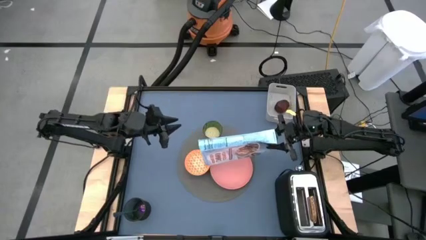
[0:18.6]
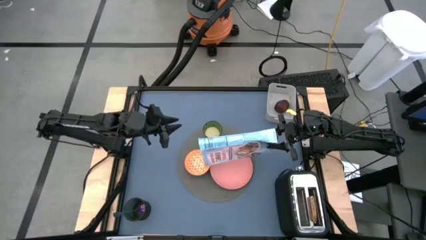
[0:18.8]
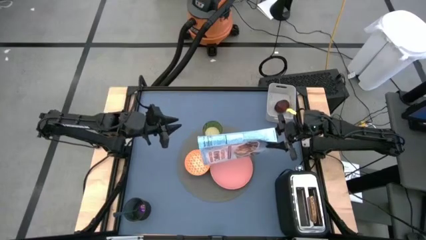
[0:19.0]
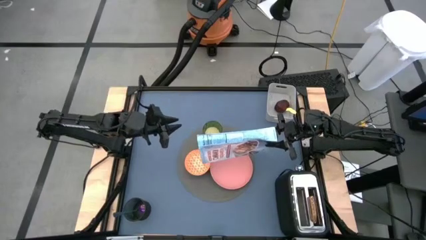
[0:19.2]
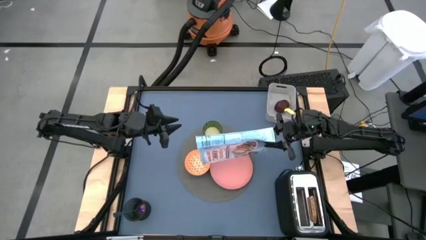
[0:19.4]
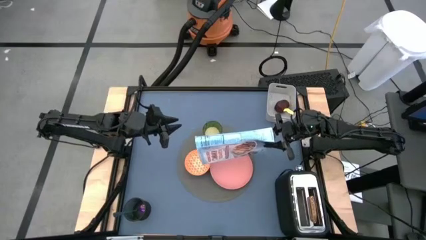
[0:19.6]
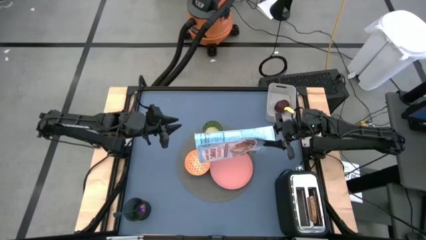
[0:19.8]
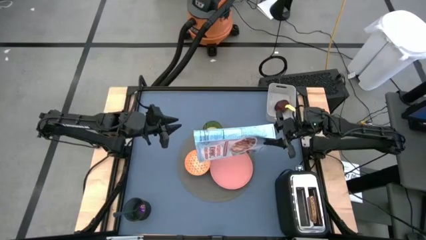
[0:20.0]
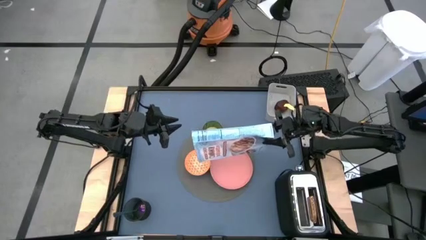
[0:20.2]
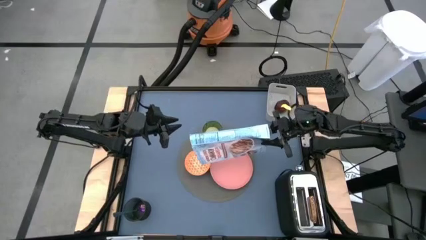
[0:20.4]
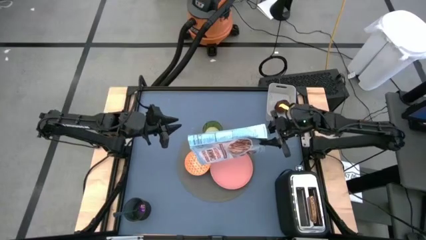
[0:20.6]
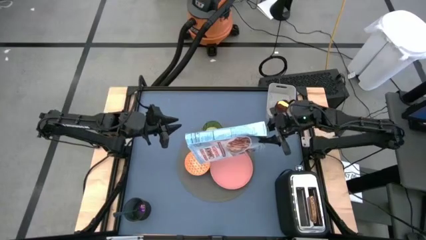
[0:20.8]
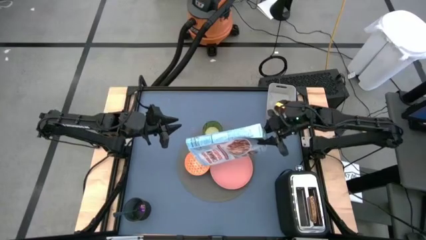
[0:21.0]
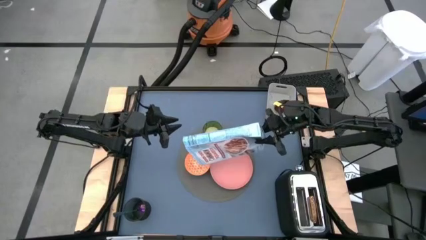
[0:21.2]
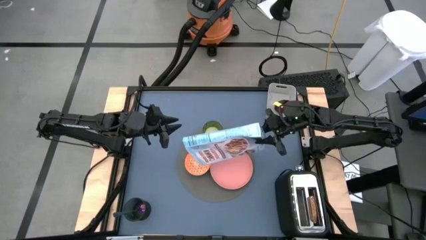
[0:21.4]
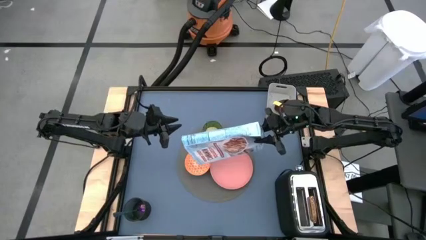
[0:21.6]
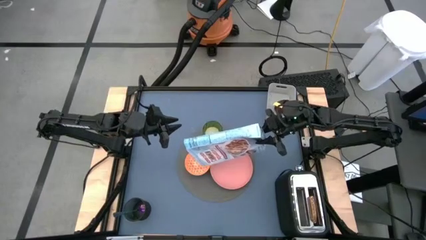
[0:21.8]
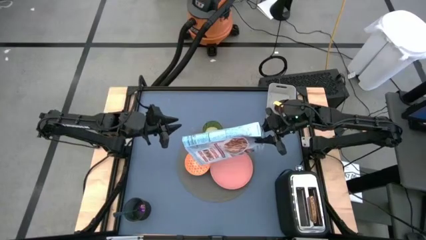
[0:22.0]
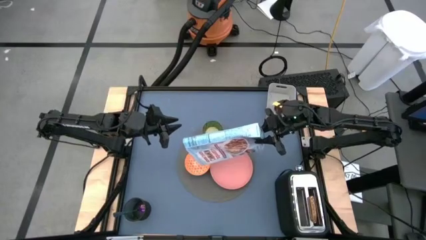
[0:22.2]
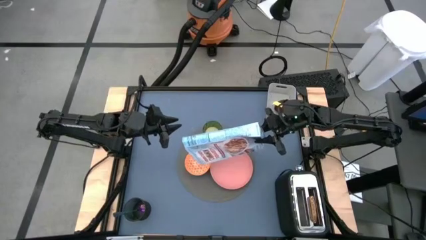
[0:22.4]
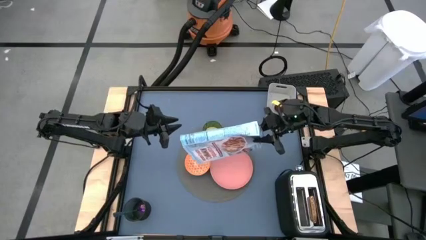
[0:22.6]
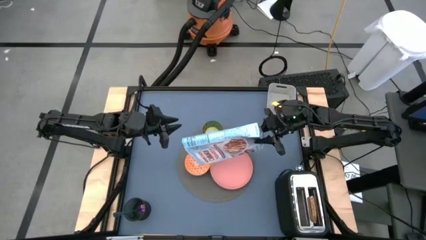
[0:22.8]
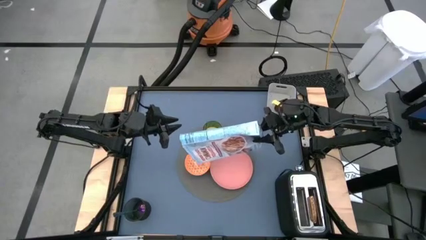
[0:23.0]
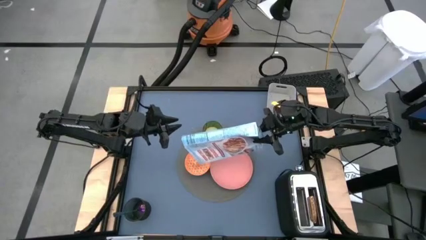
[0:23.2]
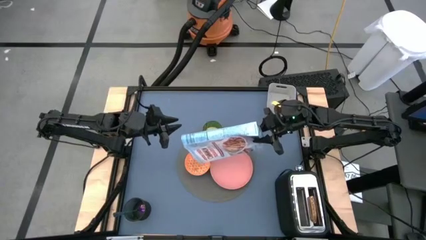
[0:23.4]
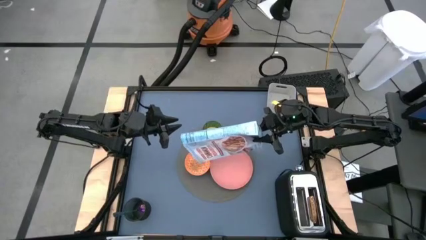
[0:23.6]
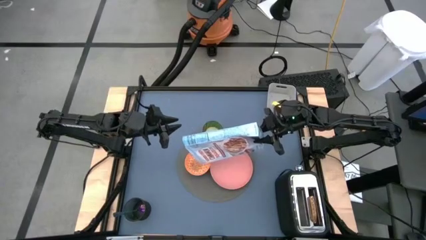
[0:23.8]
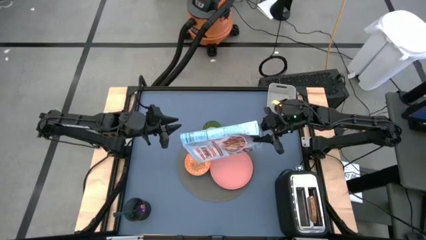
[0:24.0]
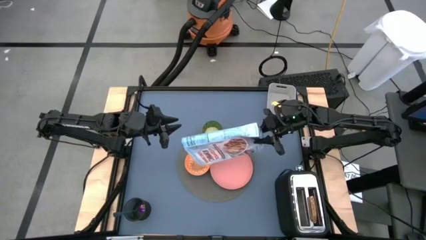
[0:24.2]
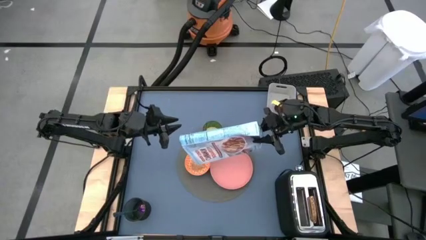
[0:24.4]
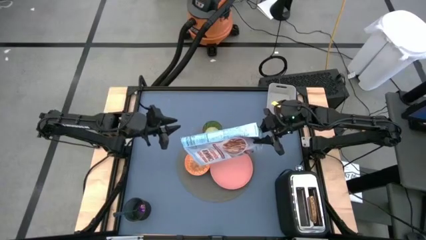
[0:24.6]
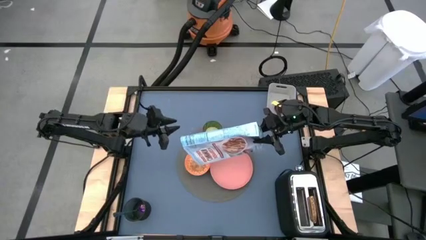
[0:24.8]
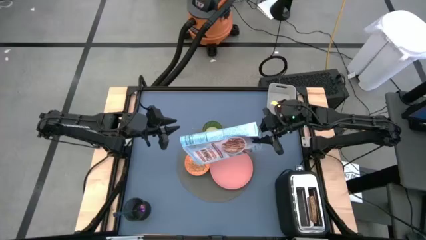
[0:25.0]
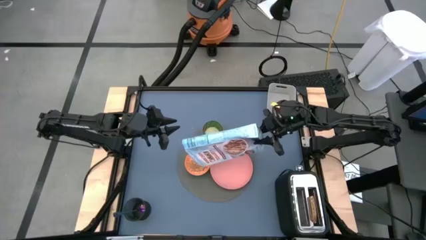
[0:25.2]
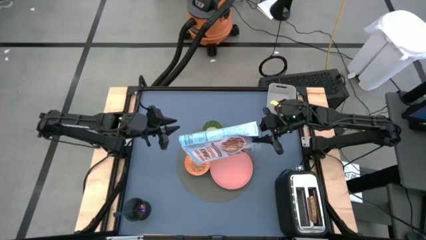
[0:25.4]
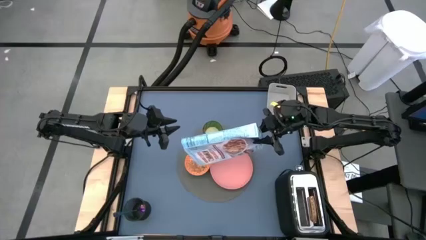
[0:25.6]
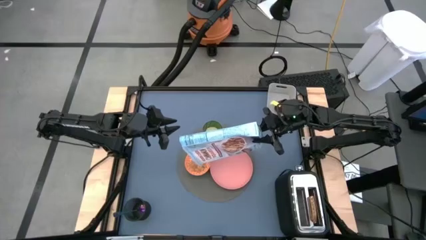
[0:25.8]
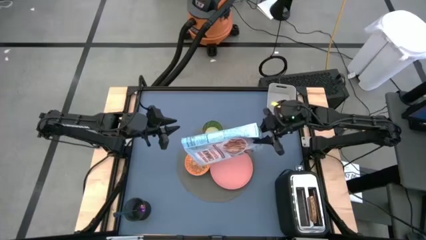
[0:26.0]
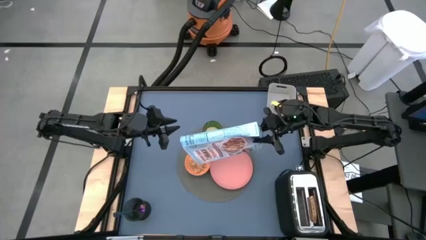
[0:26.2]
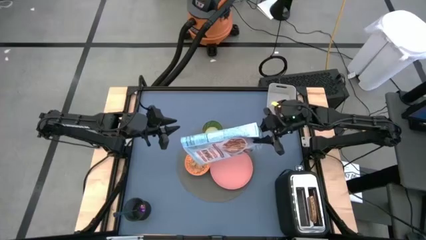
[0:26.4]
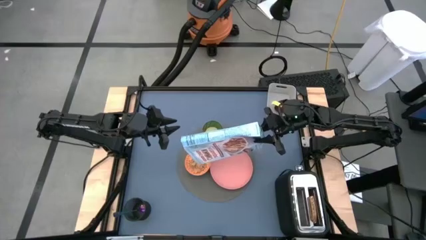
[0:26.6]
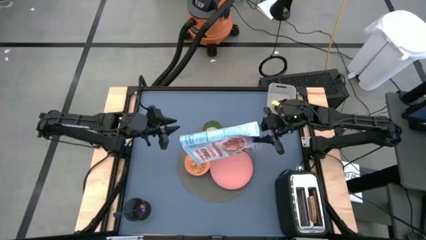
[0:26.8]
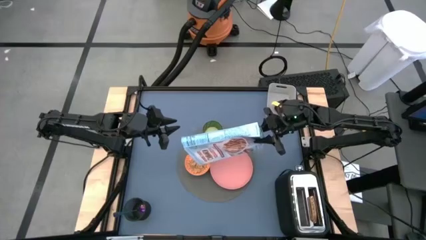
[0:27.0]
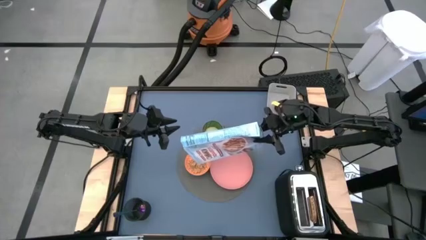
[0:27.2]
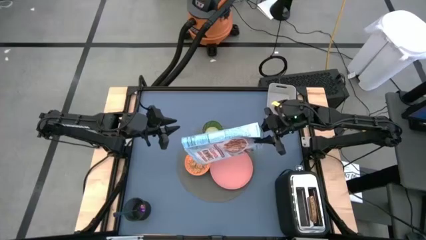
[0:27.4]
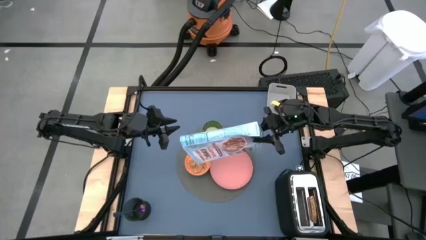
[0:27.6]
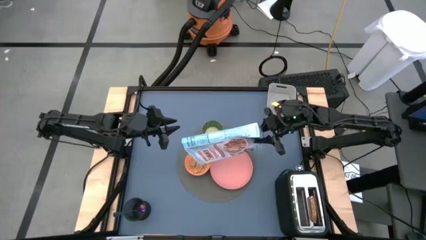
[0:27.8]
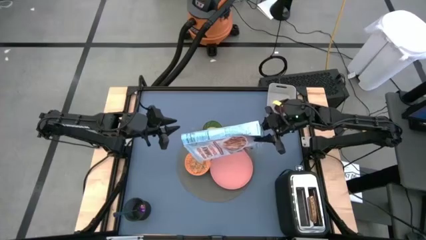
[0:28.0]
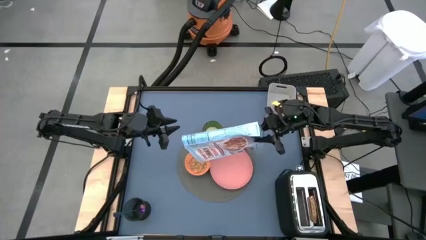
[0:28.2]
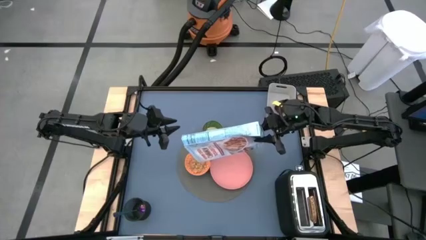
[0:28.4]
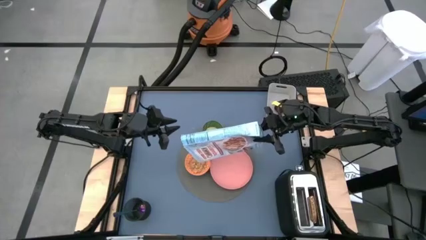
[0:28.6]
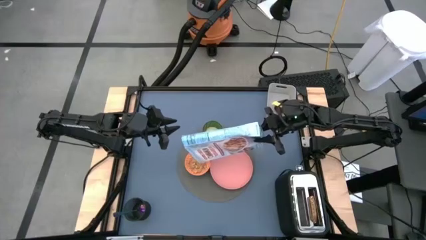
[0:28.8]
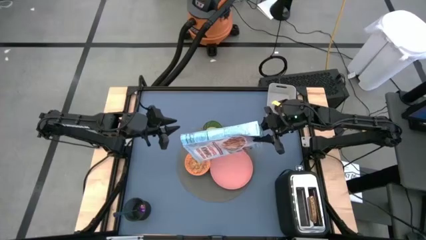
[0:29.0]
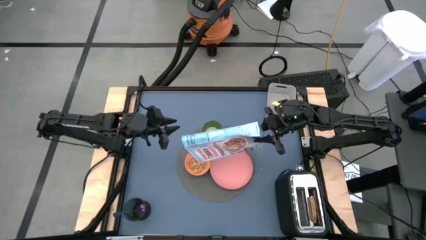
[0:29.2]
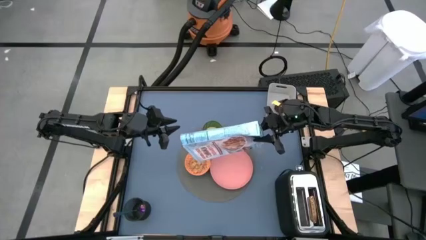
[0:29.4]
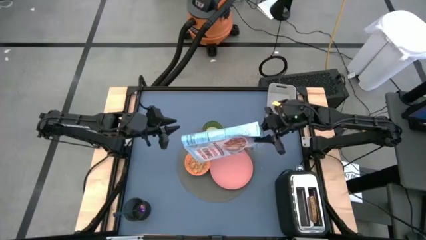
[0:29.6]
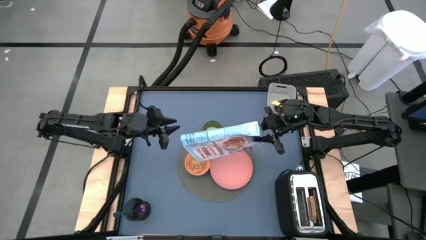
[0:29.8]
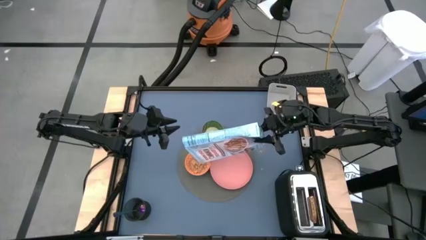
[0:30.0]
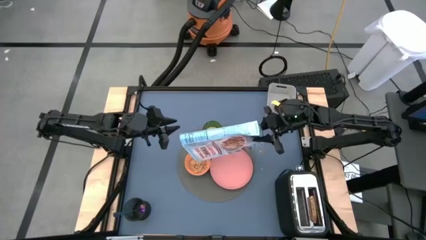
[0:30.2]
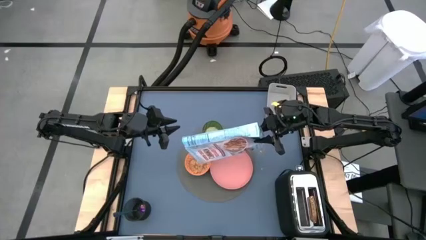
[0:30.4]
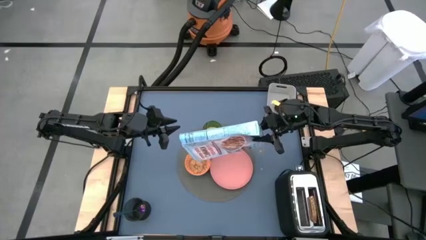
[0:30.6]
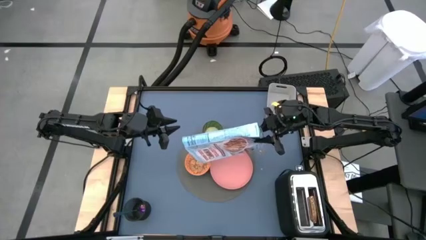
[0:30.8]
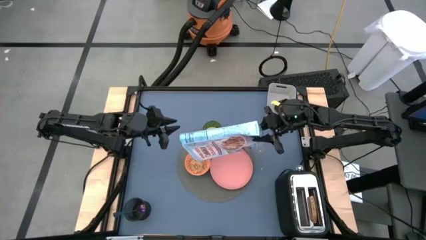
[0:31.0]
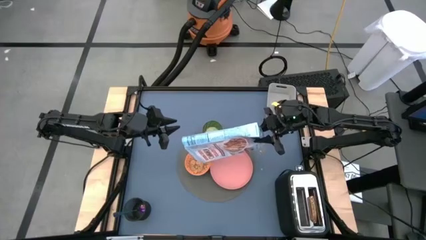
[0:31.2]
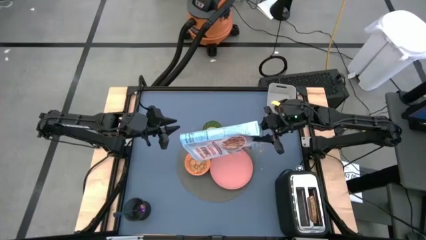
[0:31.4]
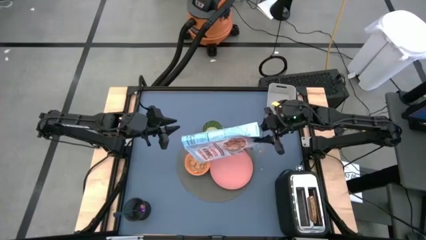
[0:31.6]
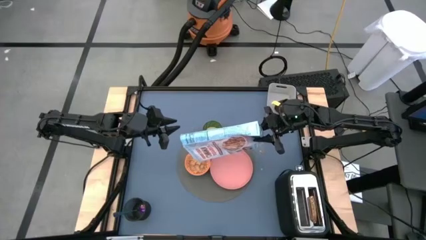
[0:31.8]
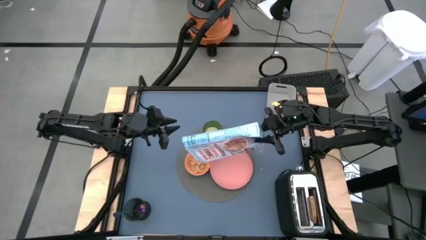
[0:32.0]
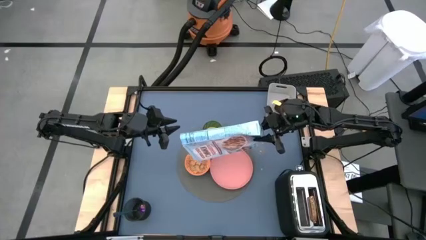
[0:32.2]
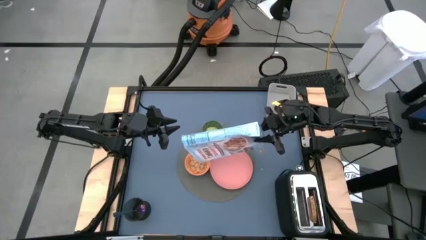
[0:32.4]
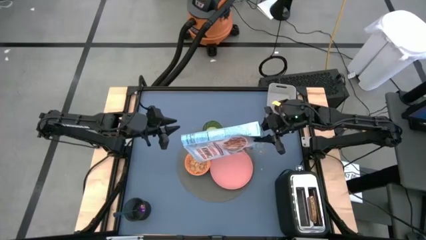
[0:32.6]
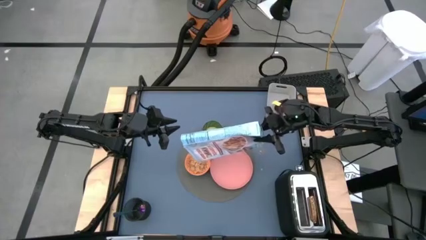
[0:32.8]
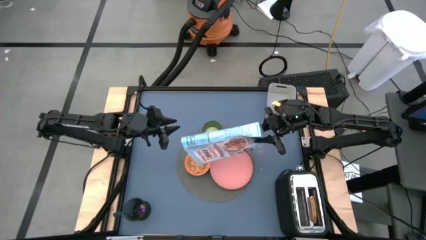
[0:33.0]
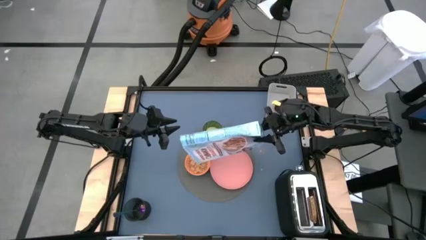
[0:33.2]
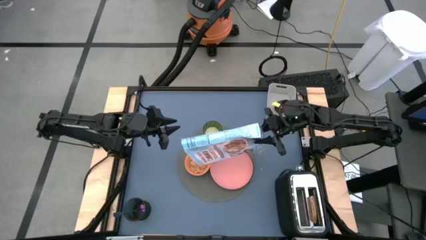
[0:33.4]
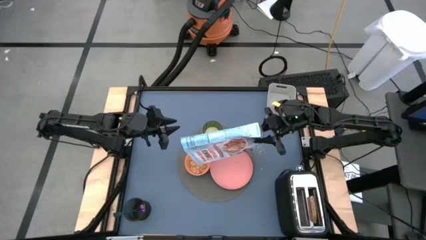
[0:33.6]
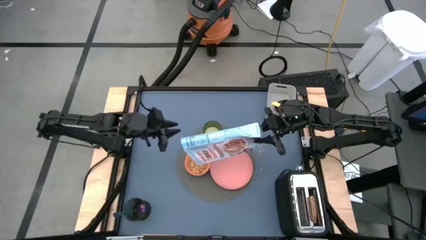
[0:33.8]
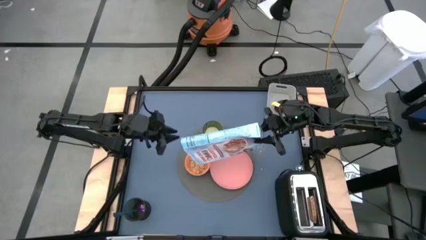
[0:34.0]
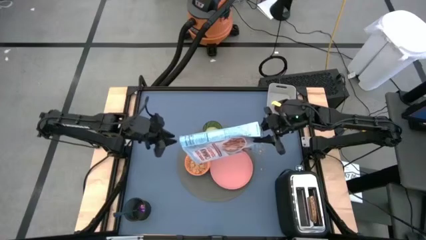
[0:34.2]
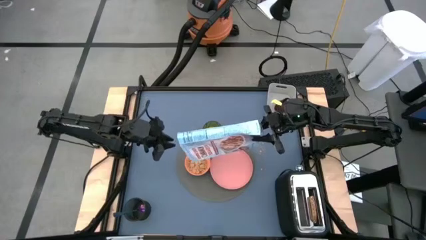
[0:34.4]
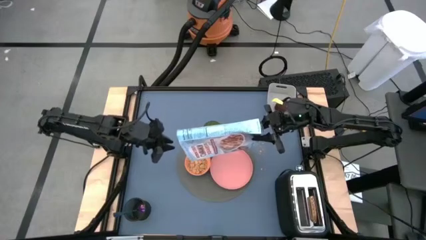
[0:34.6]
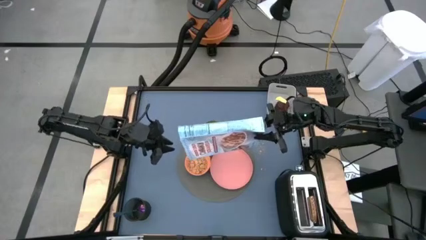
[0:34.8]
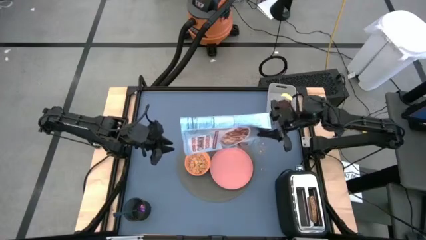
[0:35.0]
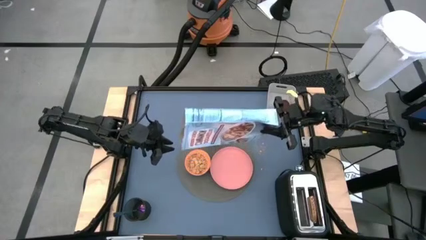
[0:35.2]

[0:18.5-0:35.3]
Task: Arrange a breakfast setting
Pour the cereal from the blue cereal box into the orange bowl
